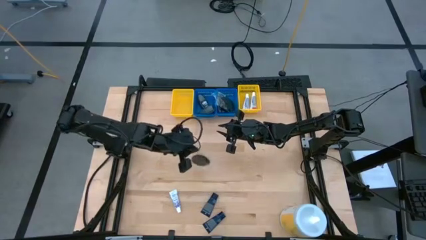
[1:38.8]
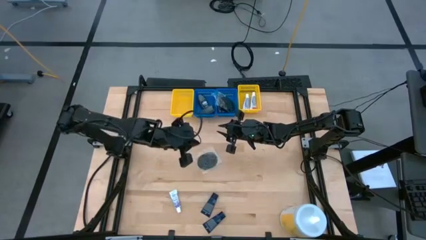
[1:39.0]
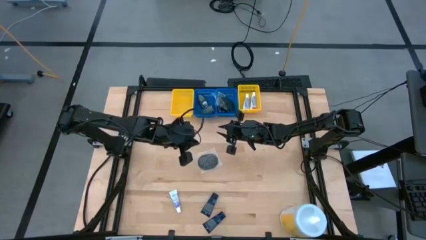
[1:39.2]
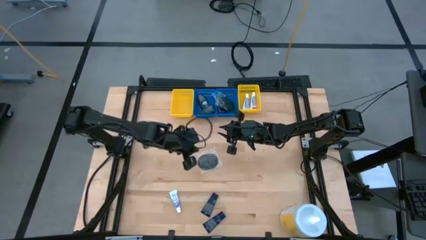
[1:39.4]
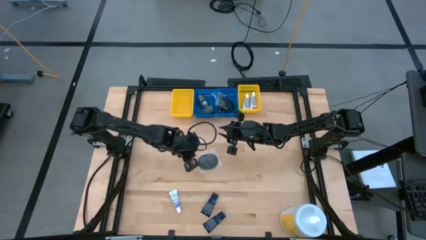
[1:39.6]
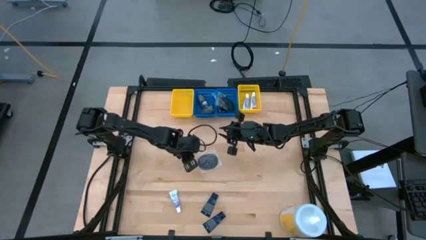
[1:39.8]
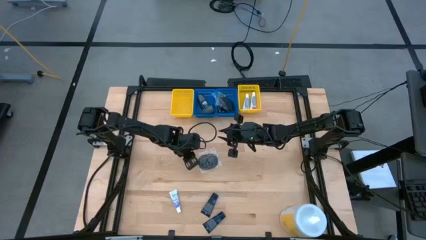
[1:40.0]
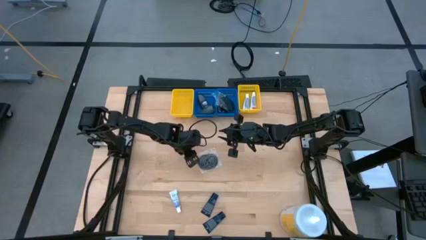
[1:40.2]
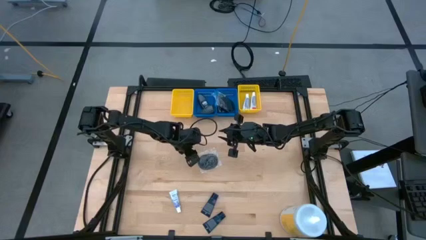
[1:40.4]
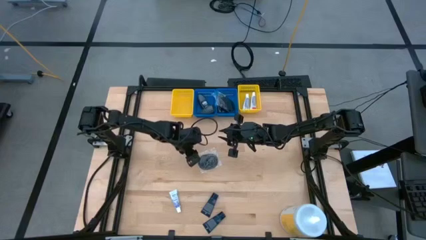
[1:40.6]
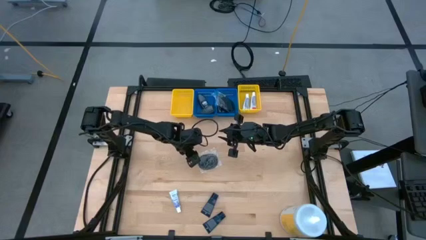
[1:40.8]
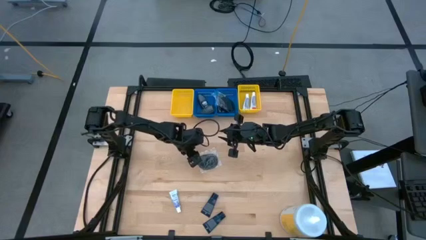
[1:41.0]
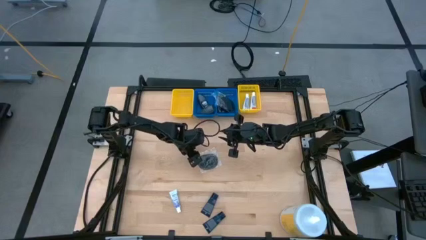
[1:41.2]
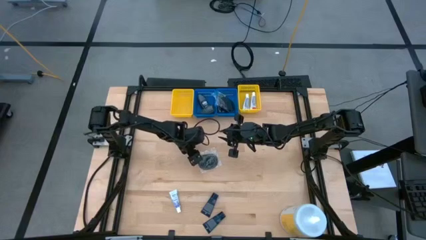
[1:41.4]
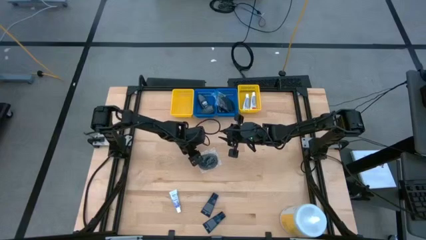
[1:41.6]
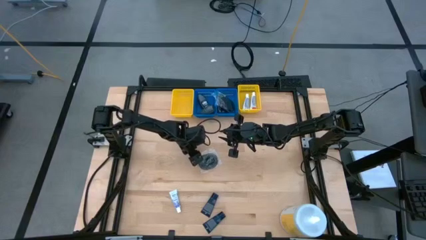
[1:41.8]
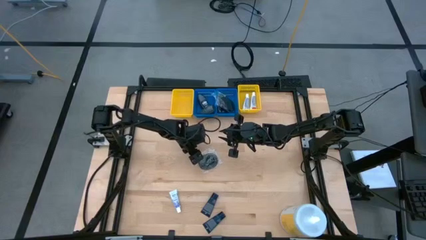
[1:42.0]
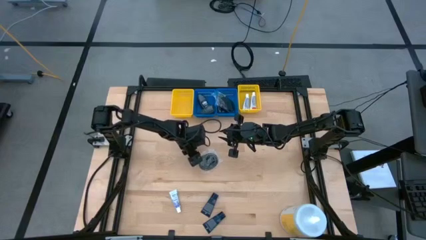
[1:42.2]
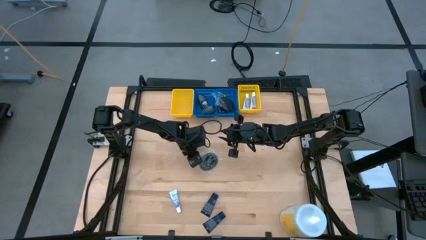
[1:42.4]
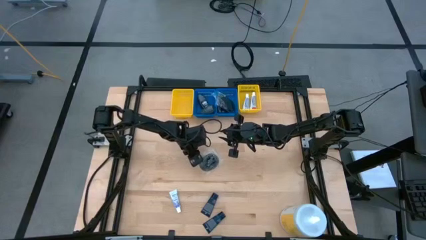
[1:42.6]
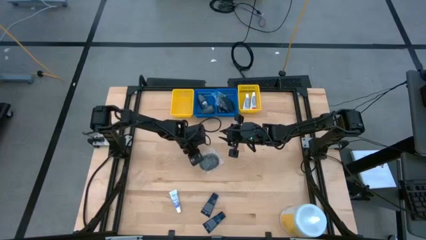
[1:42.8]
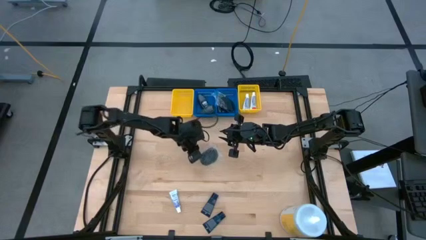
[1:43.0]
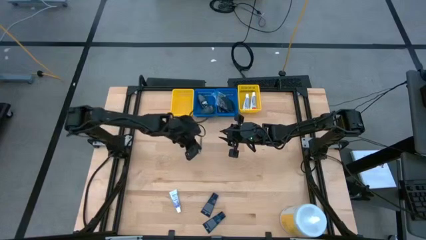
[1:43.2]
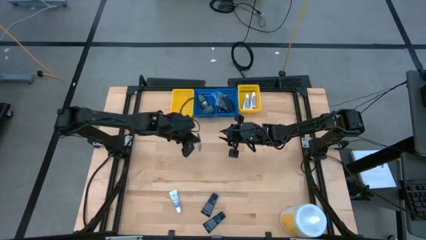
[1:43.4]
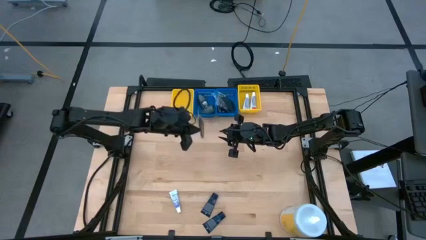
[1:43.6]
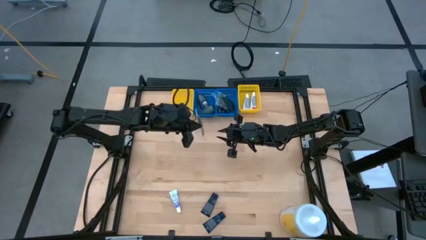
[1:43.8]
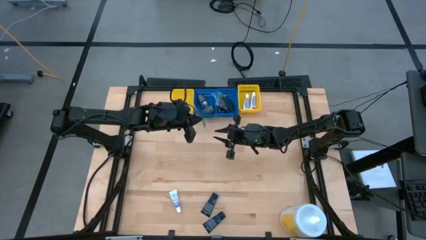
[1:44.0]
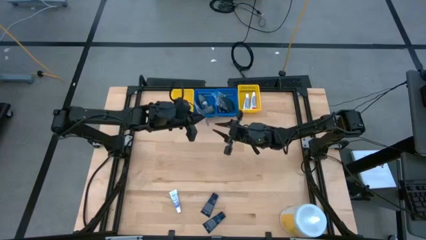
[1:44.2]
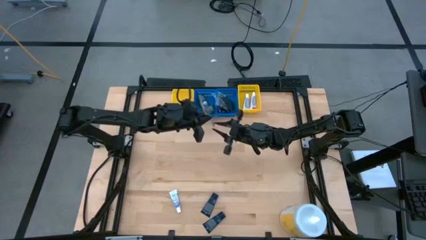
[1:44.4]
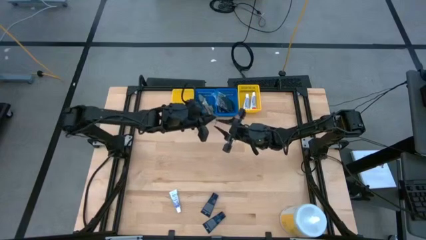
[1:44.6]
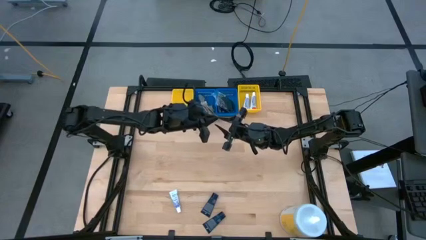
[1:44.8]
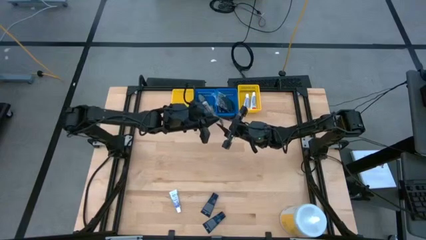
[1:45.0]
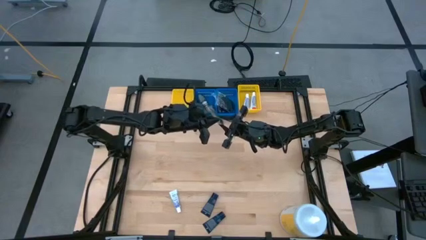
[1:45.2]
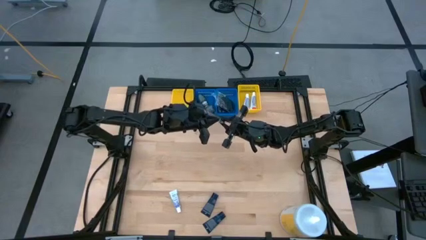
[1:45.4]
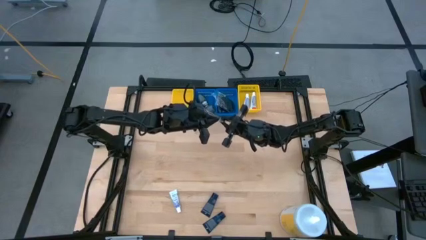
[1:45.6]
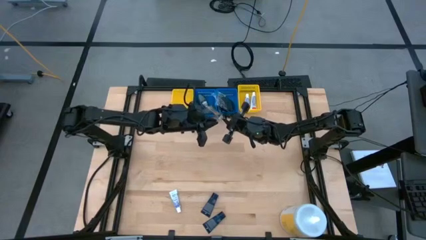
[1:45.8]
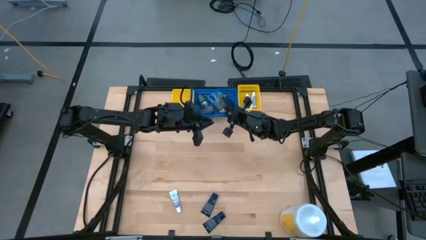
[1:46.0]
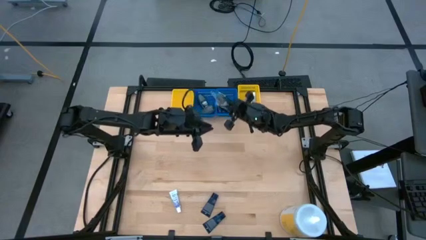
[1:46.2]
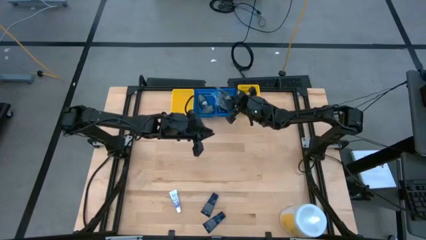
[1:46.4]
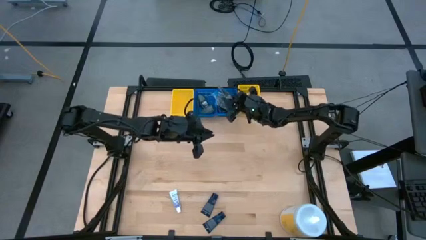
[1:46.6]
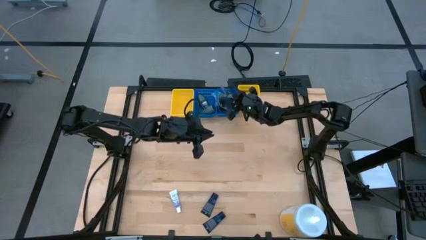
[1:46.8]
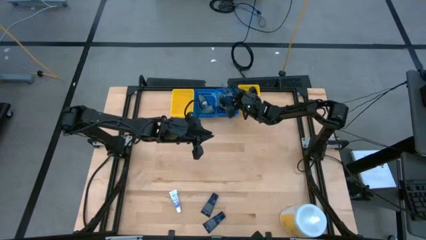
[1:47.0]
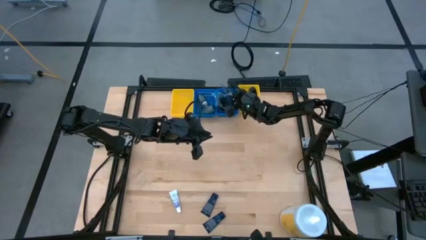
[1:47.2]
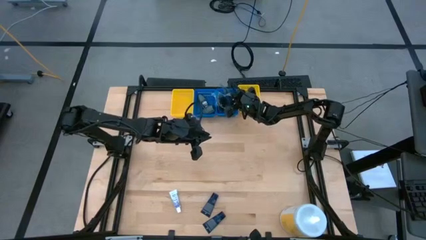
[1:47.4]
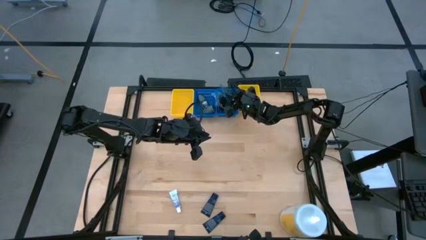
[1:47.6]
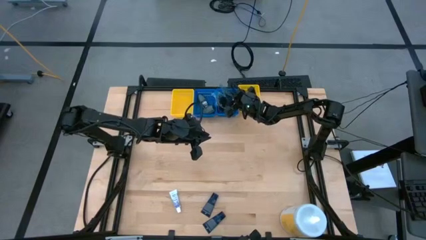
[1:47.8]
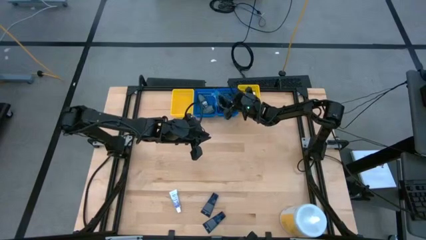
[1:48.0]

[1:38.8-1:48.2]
Task: Pick & Place Travel size toiletries
Put the black hairbrush into the right blue bin

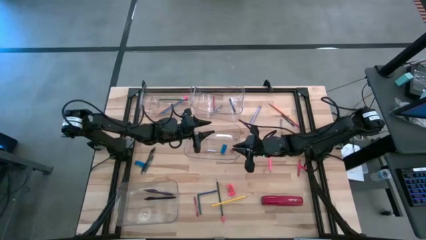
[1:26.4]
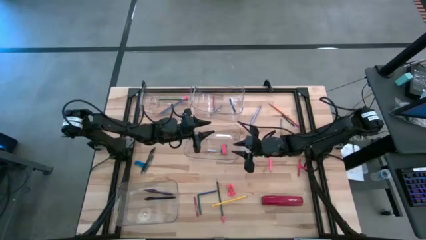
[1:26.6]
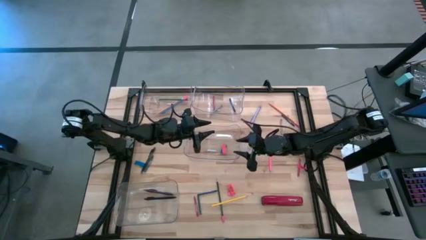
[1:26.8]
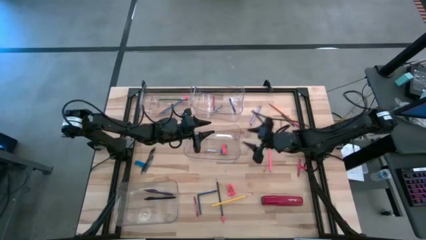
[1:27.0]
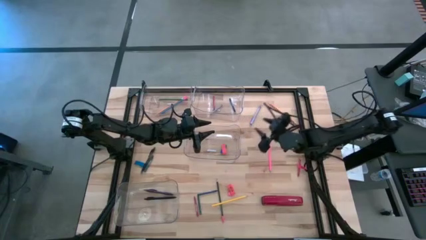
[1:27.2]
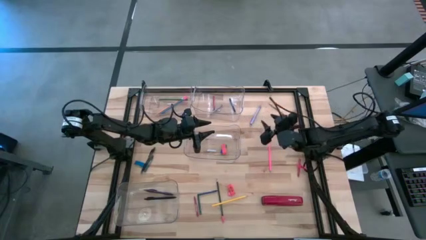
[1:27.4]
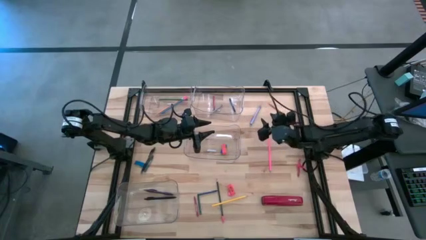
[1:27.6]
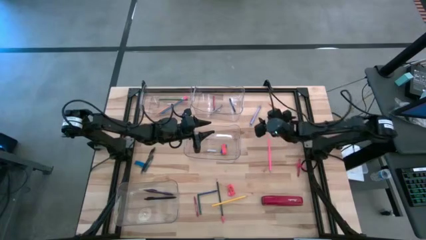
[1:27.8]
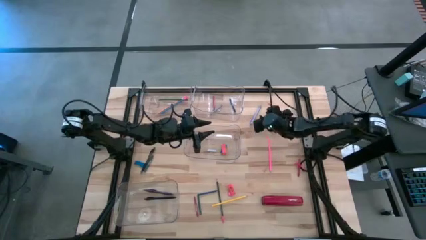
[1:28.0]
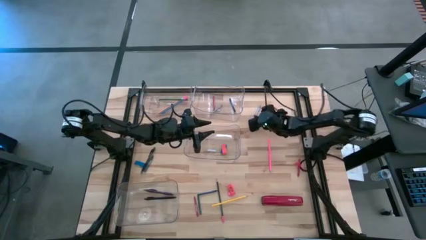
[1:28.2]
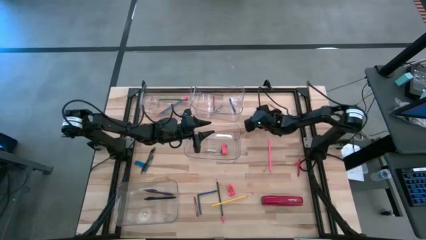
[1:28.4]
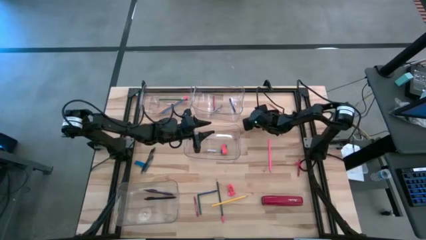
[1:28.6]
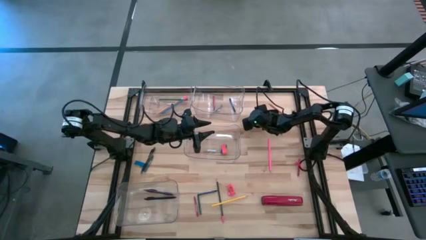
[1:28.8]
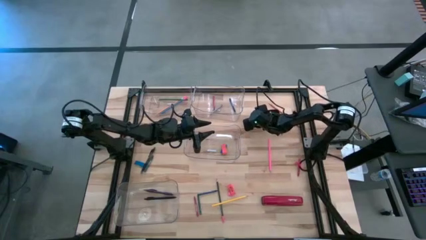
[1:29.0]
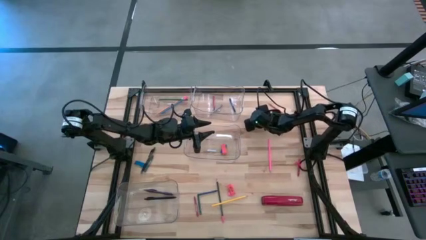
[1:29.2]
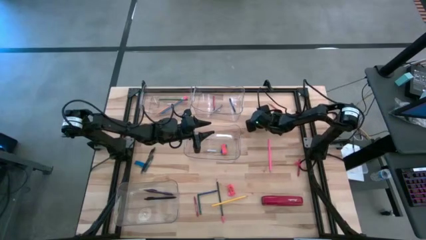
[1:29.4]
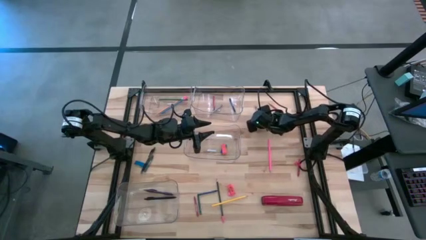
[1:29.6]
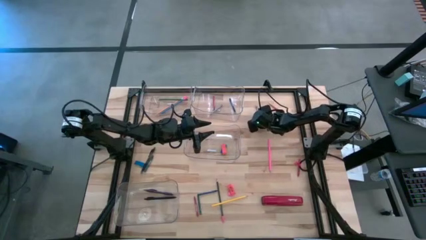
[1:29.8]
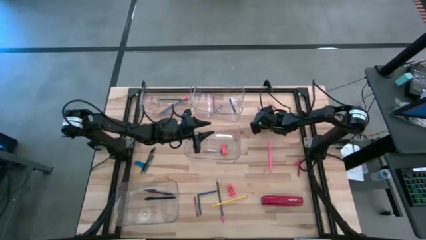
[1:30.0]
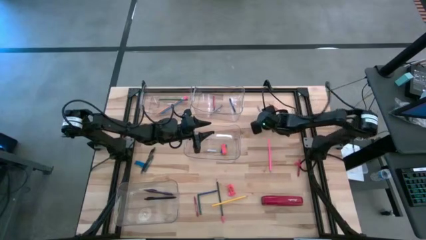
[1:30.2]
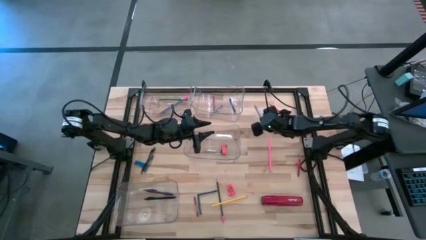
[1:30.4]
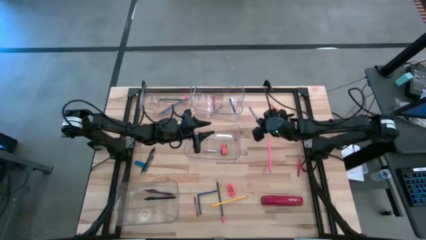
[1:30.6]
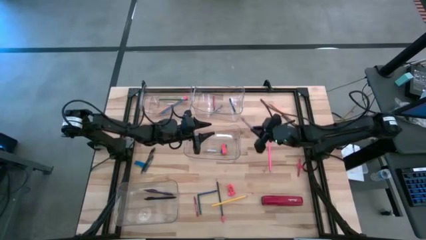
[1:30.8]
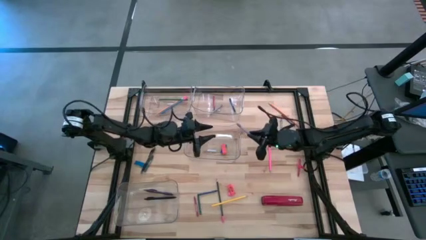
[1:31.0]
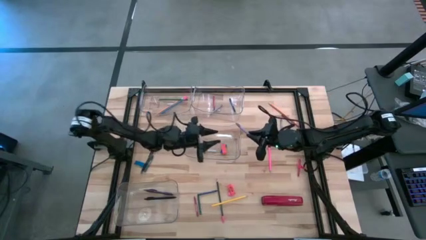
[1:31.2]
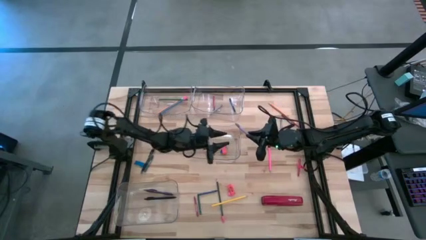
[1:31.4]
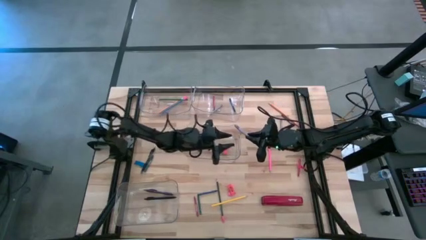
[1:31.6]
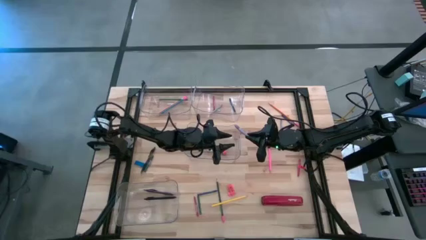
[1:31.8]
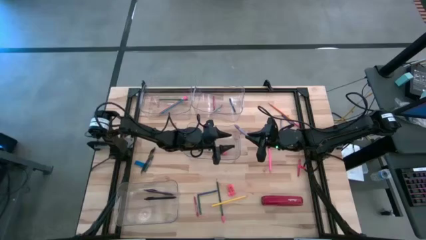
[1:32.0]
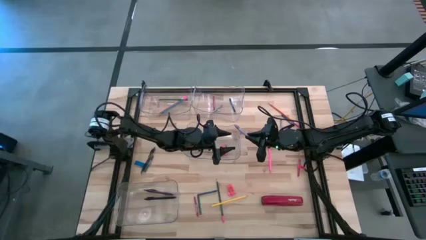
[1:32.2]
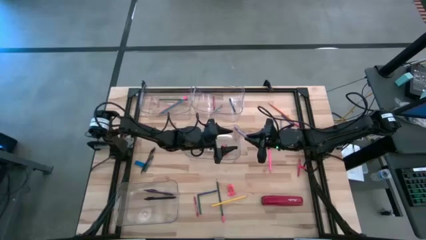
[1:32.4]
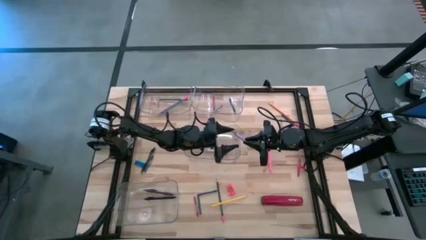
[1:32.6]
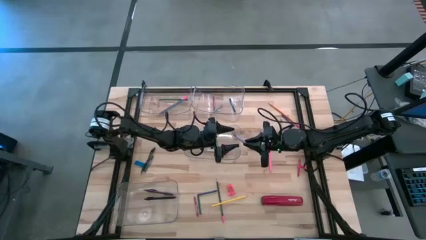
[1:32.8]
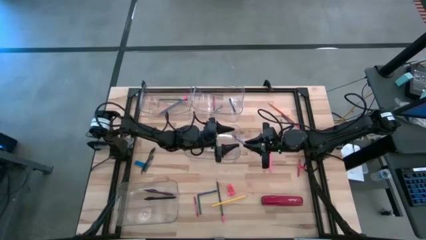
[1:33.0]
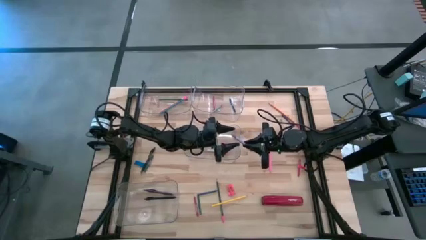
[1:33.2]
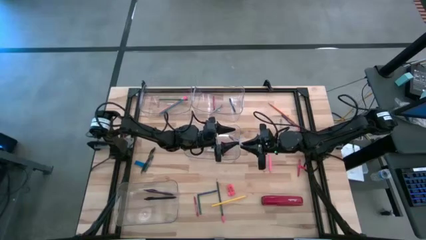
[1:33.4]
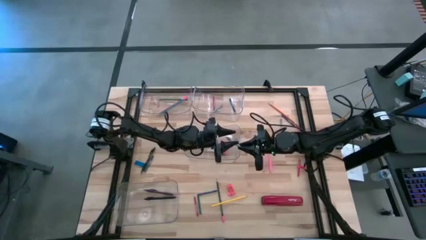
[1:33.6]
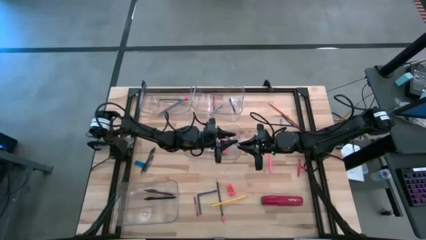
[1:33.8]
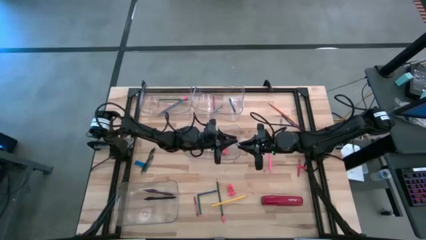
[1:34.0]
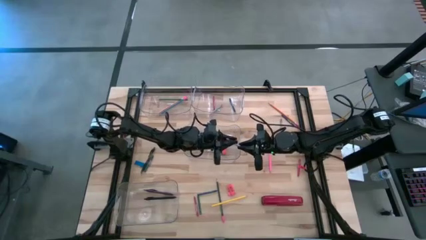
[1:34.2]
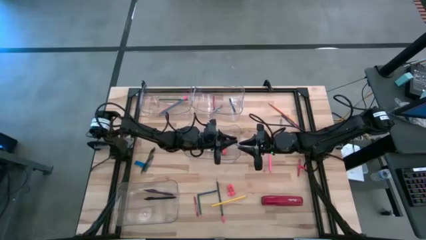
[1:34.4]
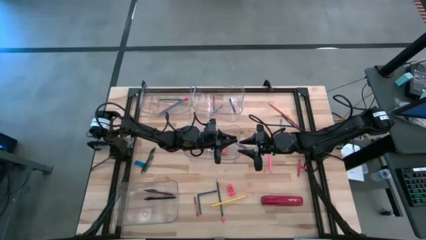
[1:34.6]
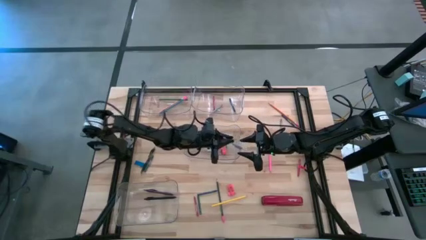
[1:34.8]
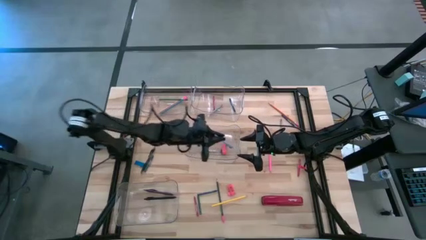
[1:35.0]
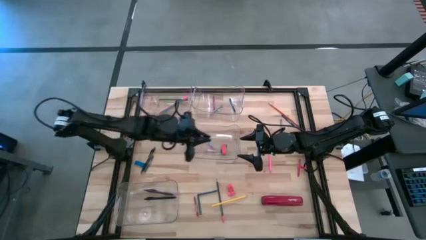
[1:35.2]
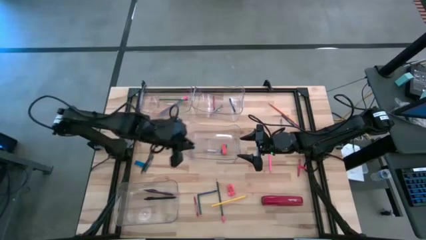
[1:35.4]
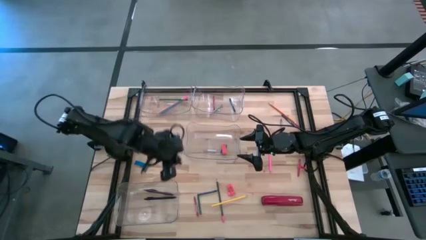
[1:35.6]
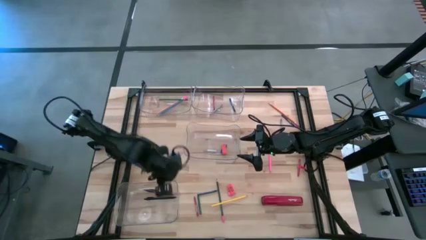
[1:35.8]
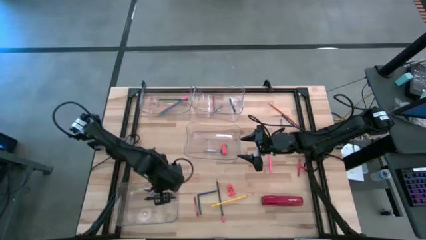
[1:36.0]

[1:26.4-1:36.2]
Task: Sort crayons/erasers/pens/pencils in bins
Put the white pen into the bottom transparent bin
